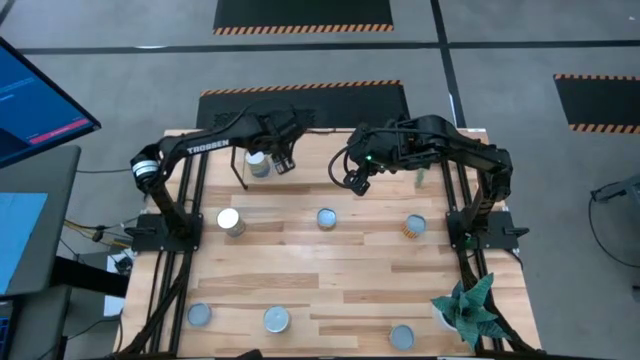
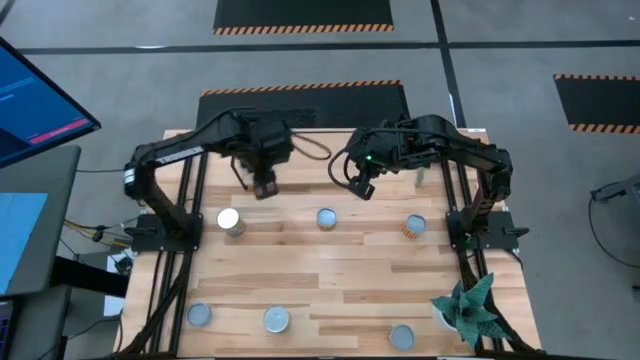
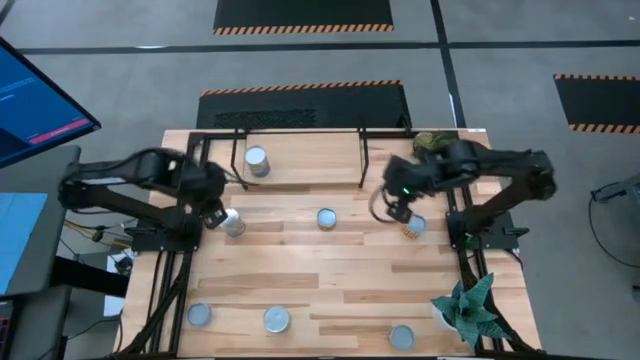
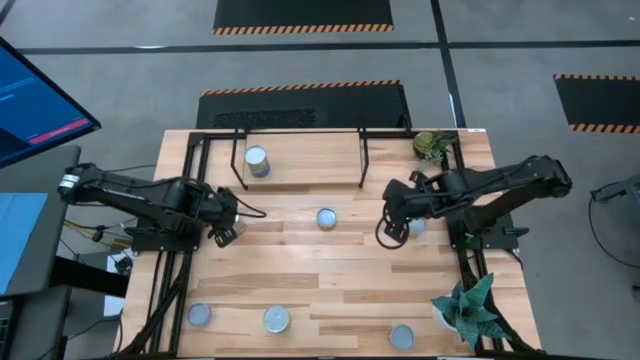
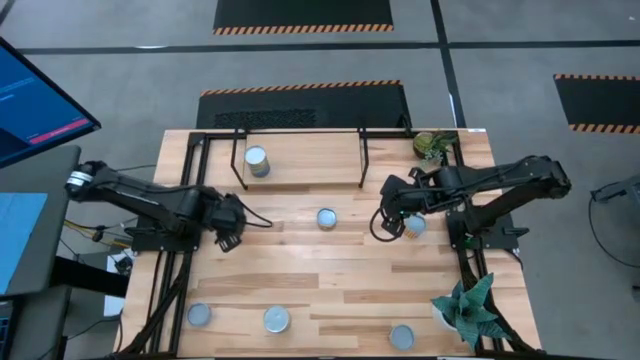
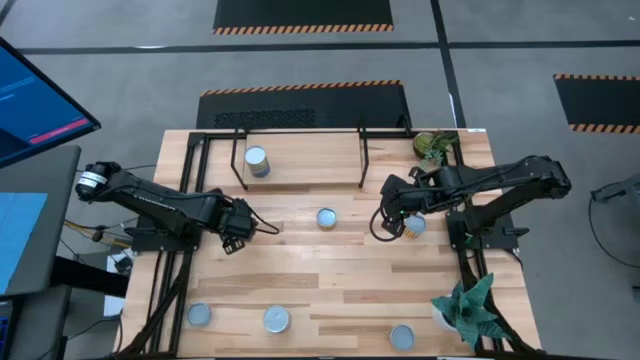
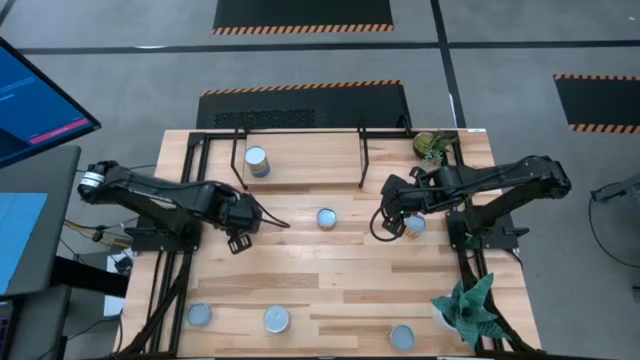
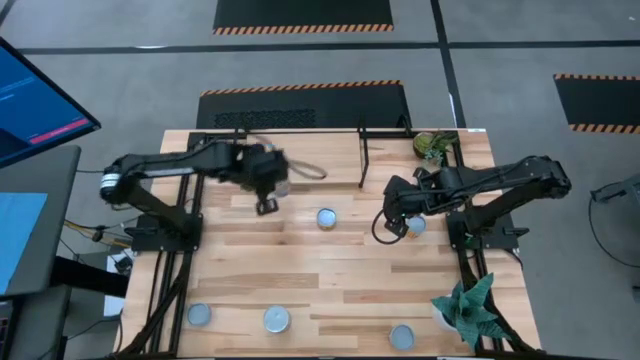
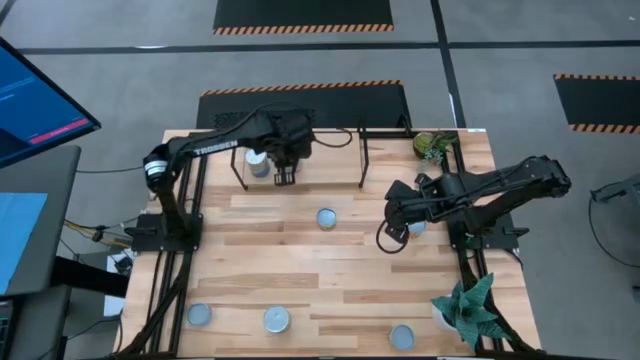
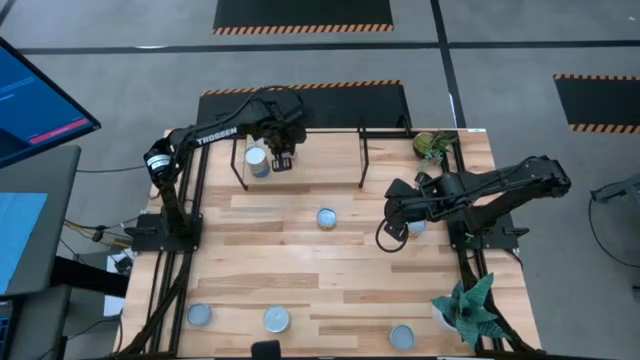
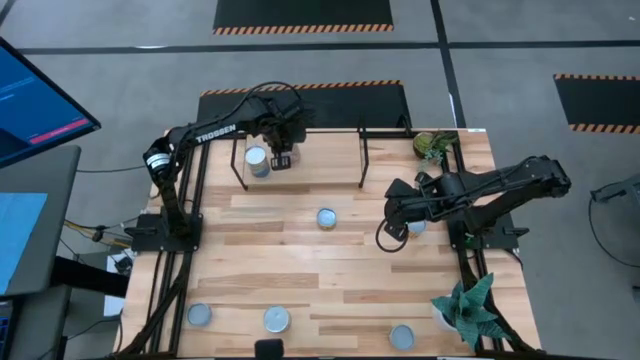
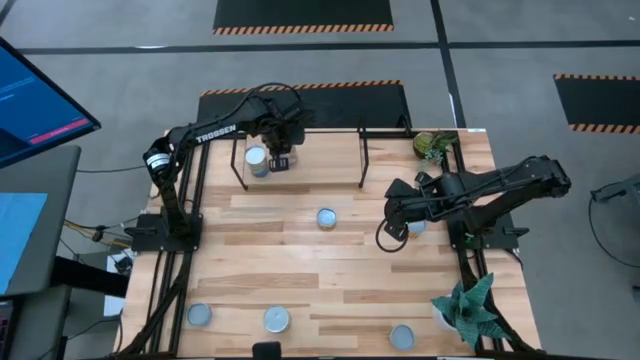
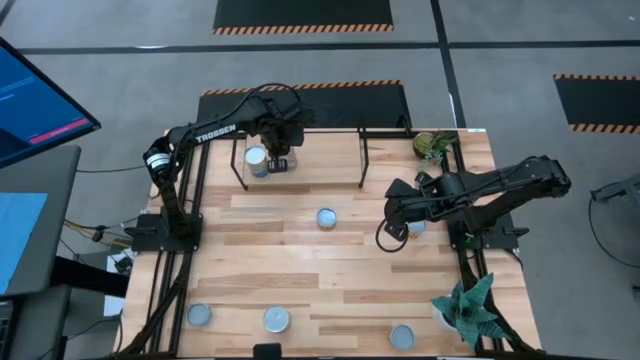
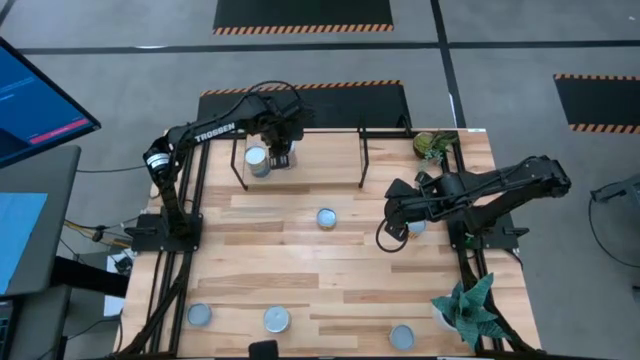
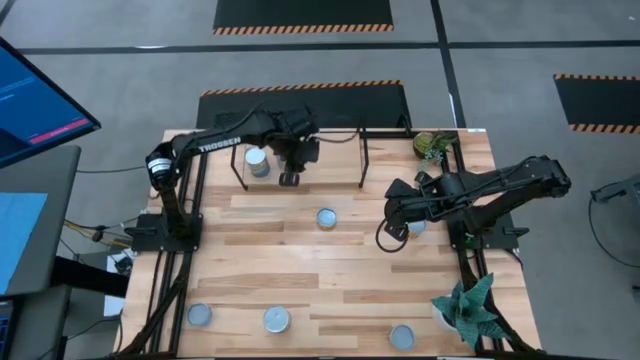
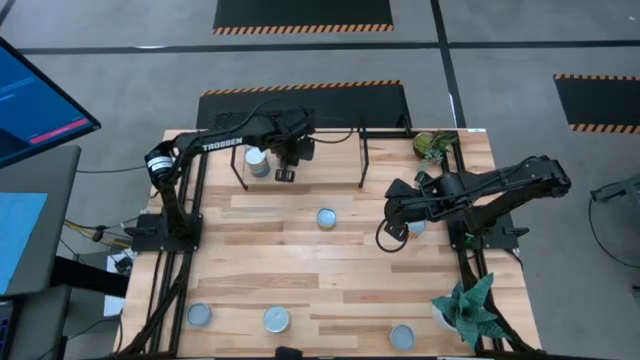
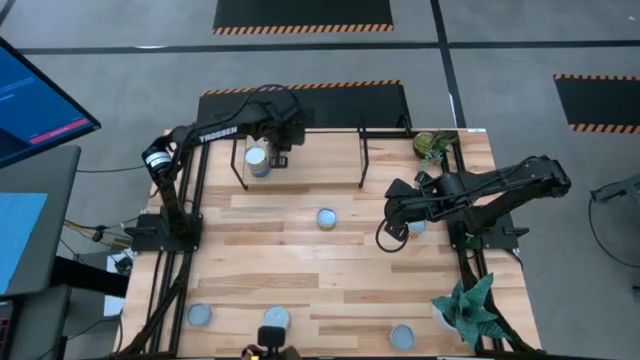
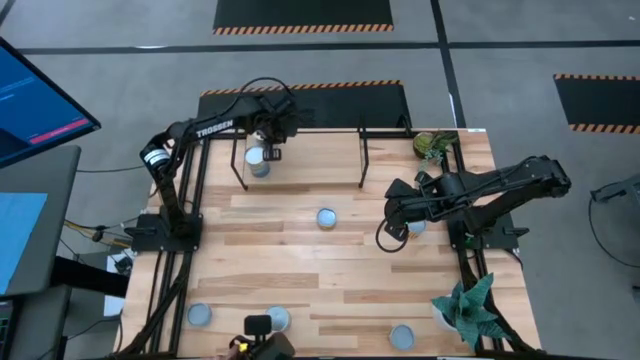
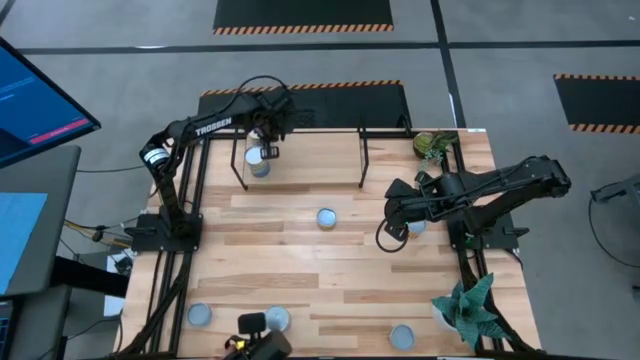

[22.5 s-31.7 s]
Task: Pick and place cans onto a shelf
Put the canned peaches on the shelf

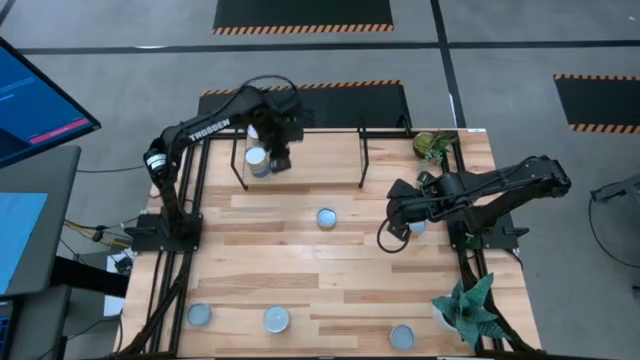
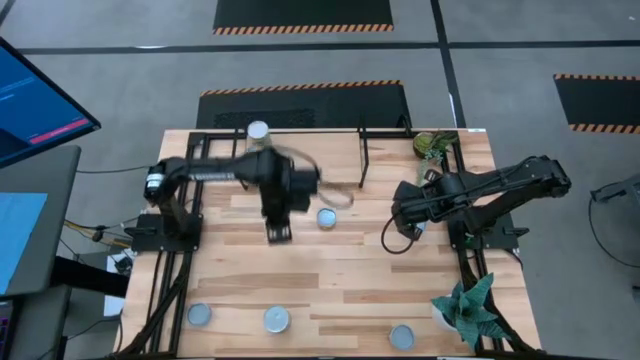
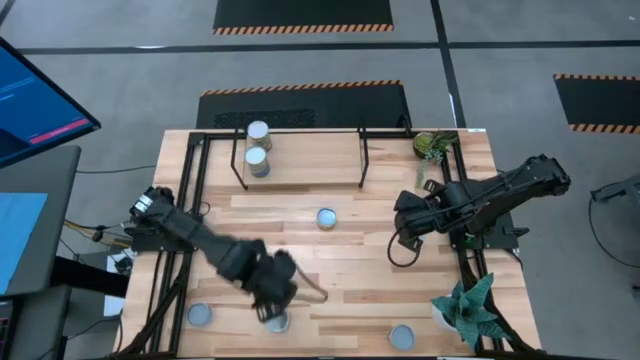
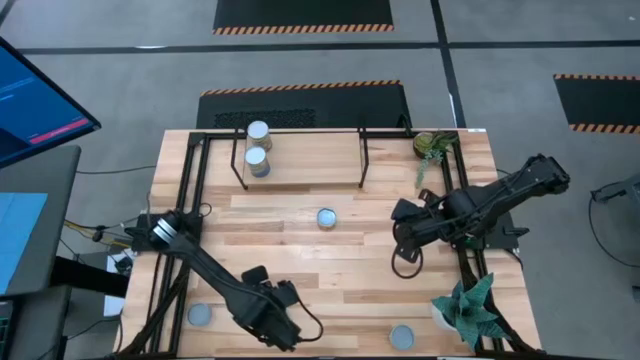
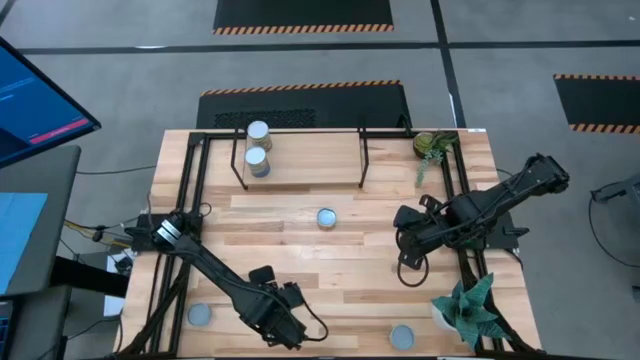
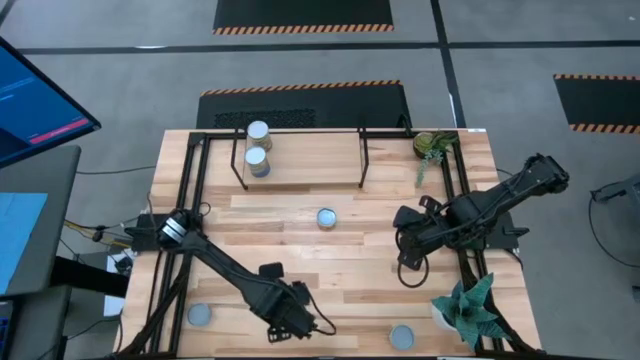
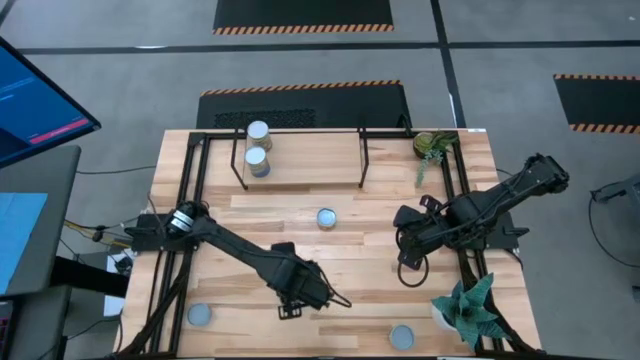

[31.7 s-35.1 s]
Put the canned carrots on the shelf

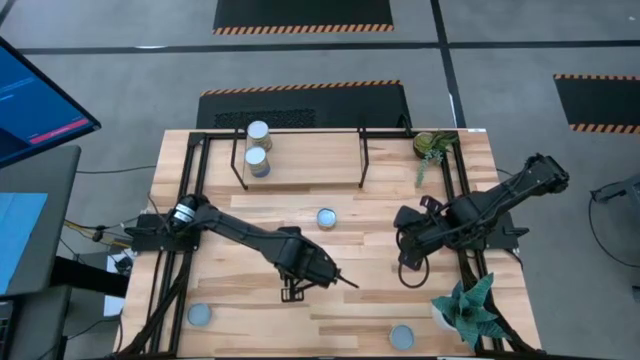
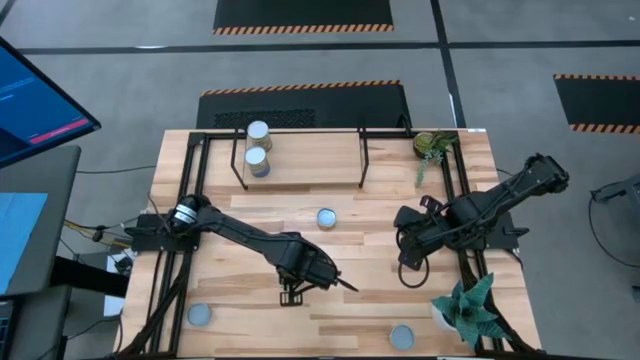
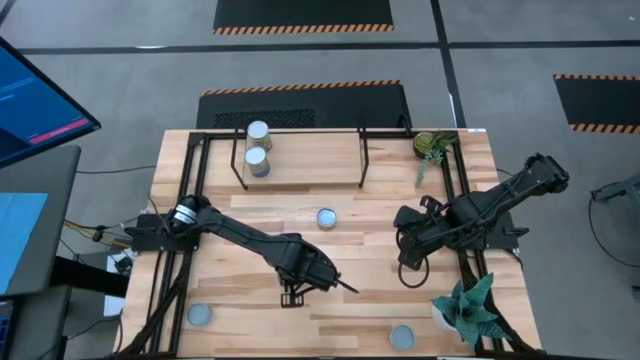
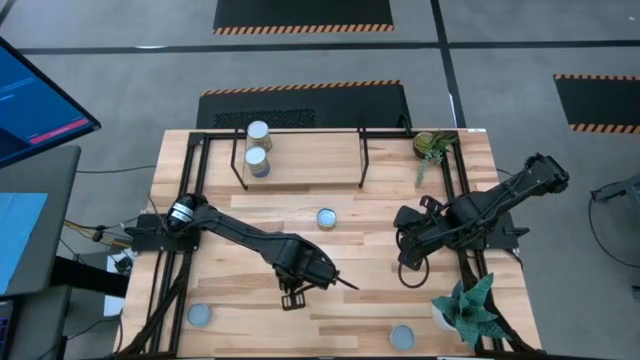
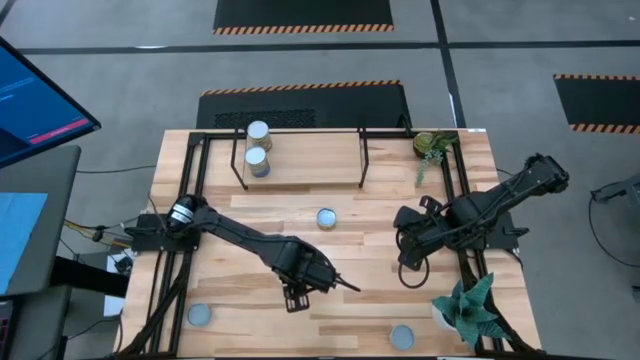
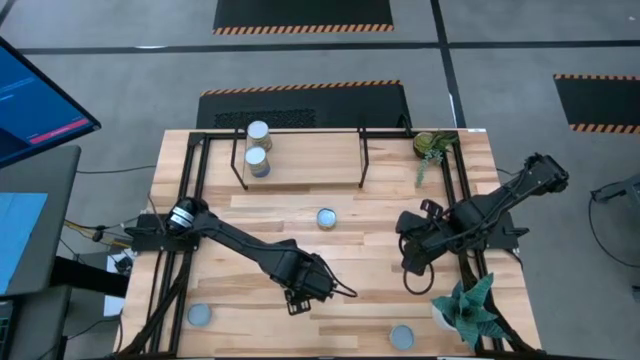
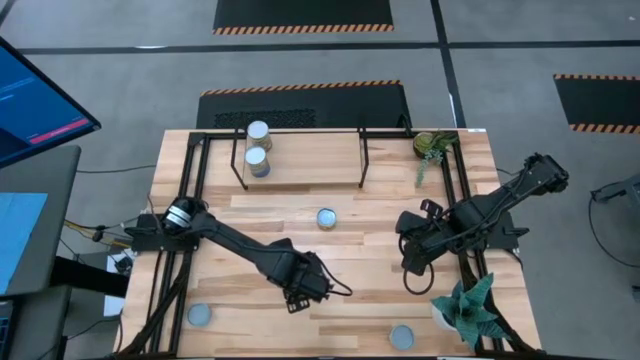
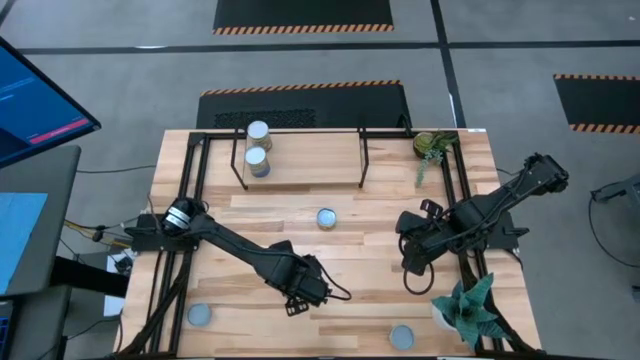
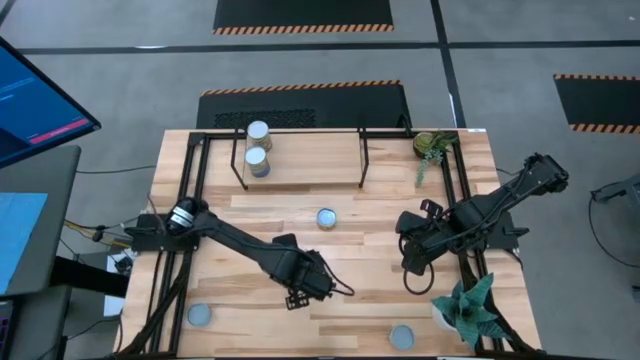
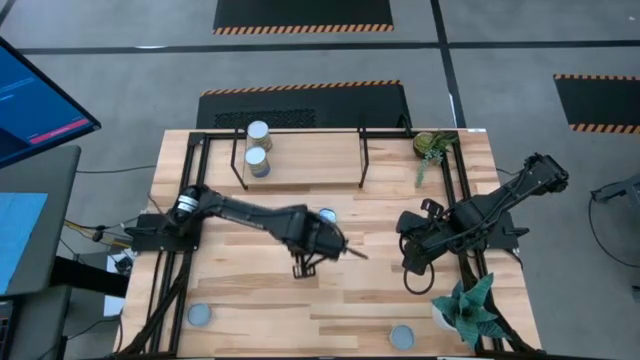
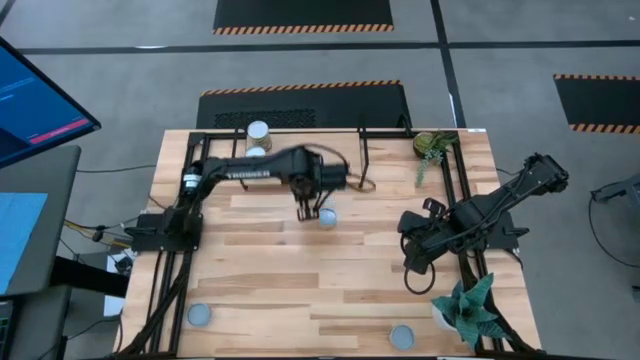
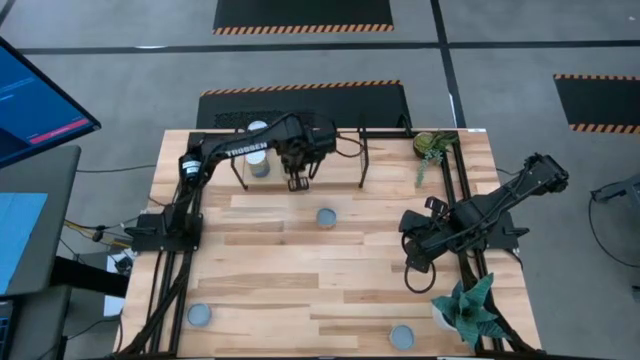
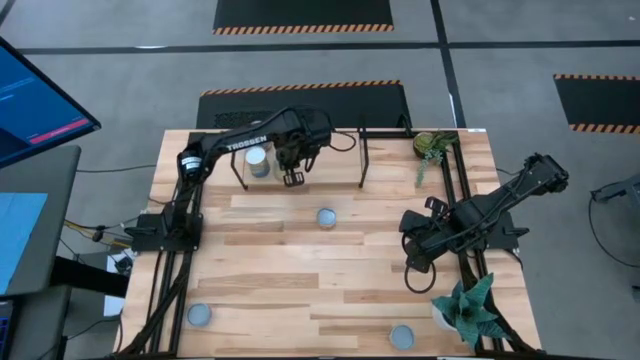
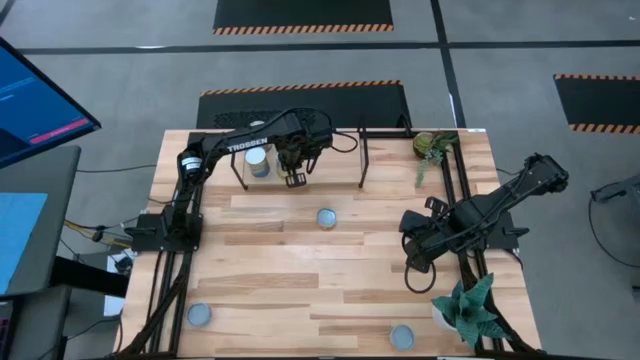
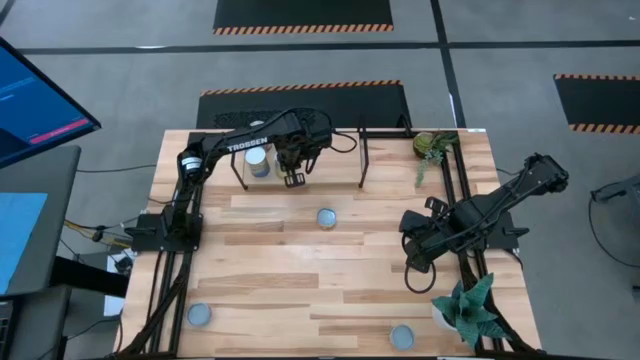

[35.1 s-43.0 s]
Put the canned carrots on the shelf
